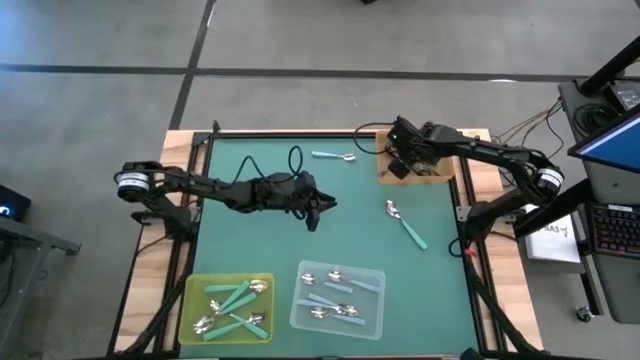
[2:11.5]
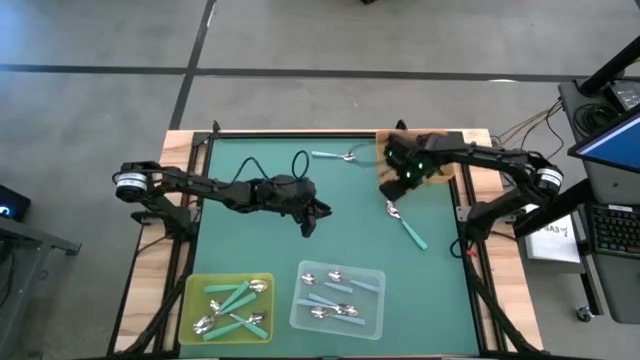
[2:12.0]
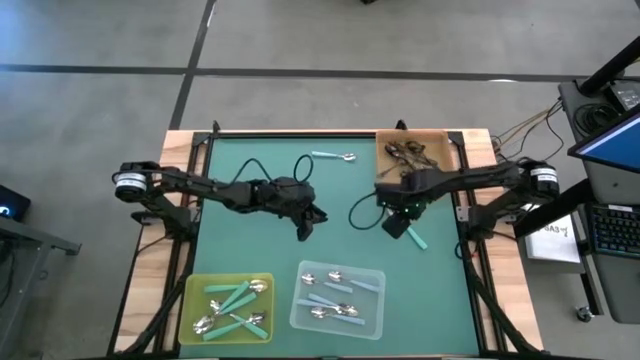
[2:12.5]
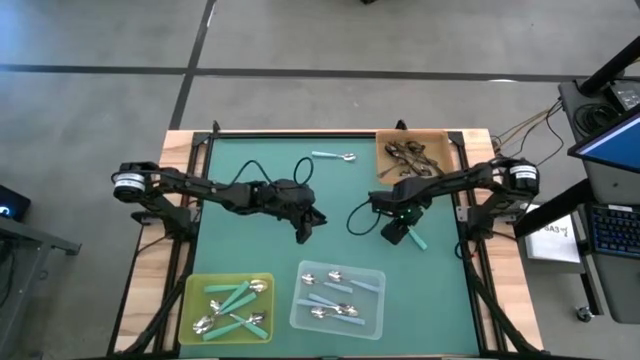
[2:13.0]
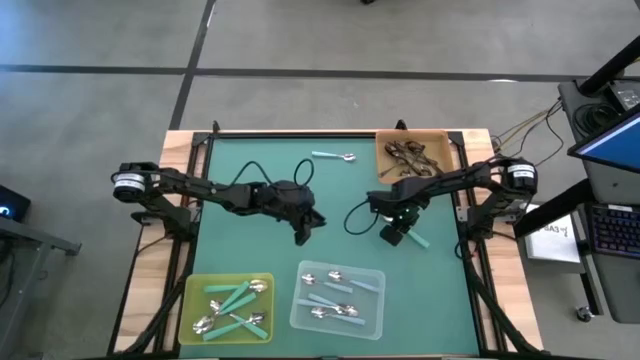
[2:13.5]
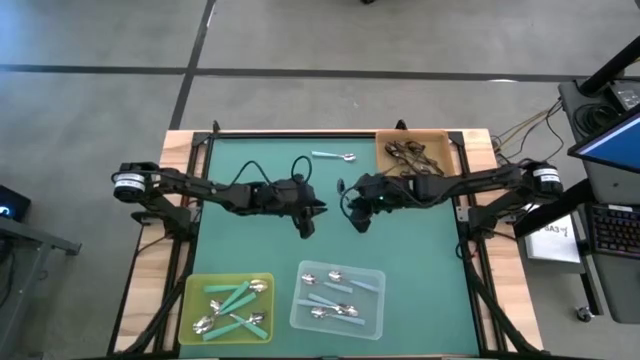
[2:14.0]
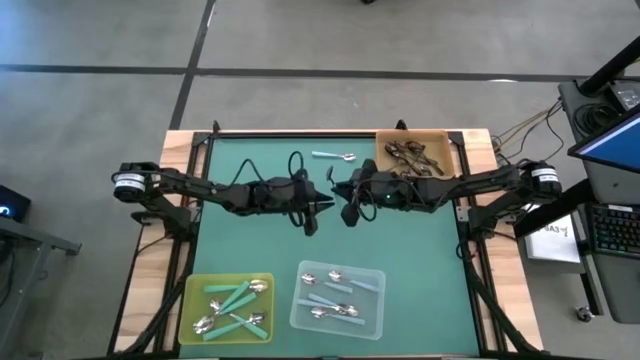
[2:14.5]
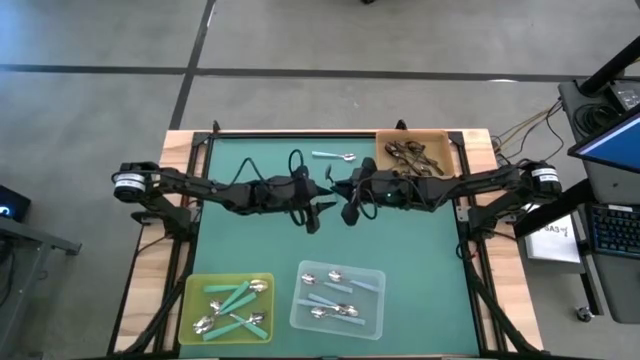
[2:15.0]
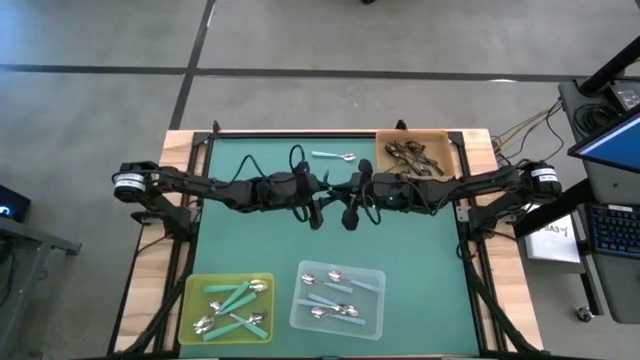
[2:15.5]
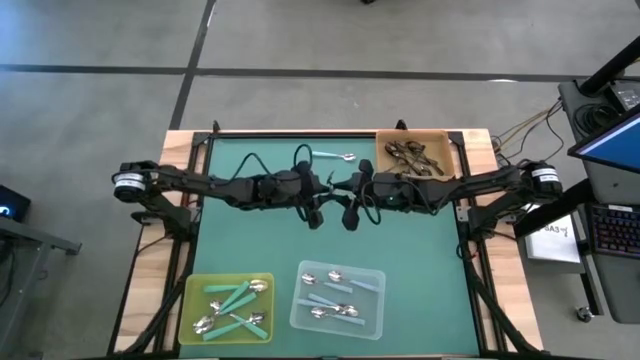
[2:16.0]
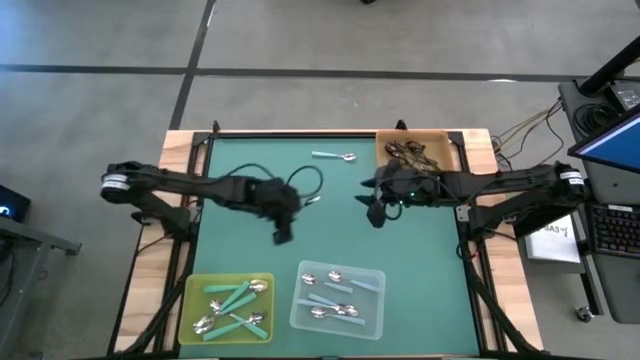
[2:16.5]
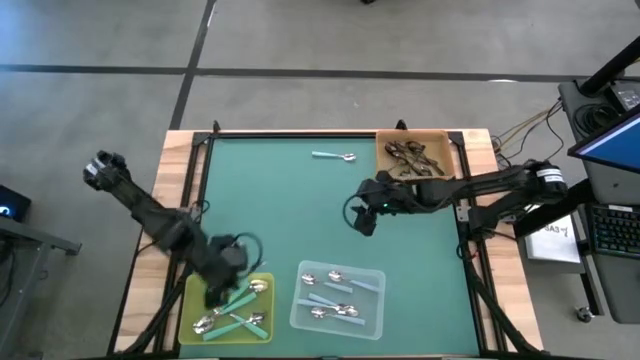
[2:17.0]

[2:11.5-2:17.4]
Task: Sort silverware by color (type)
Put the green spoon into the yellow bin

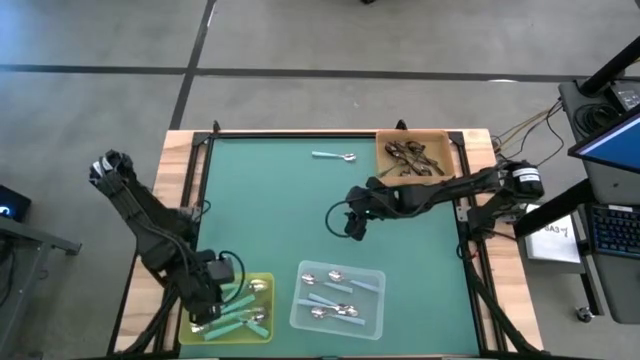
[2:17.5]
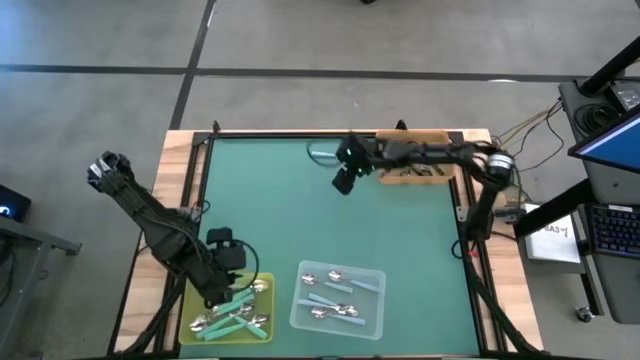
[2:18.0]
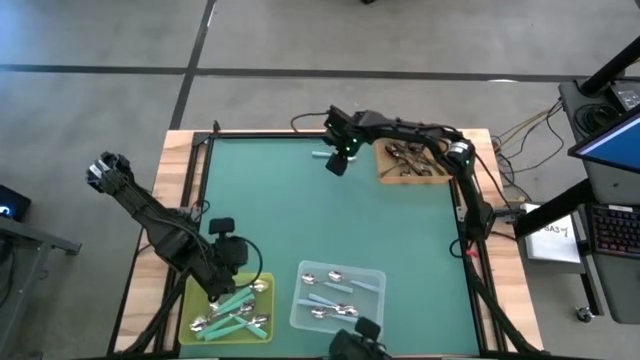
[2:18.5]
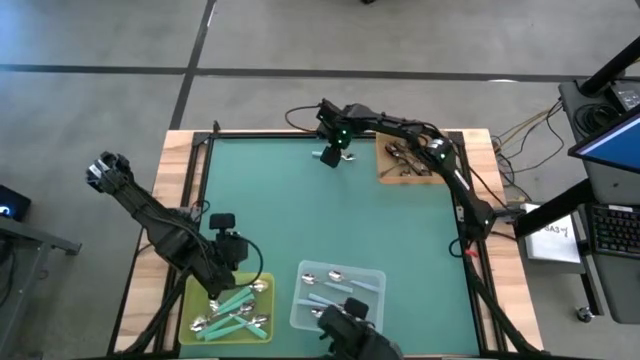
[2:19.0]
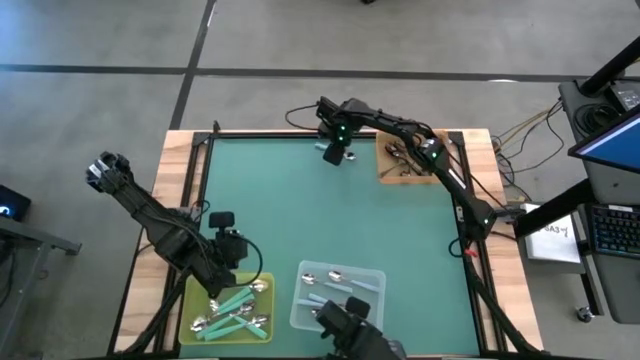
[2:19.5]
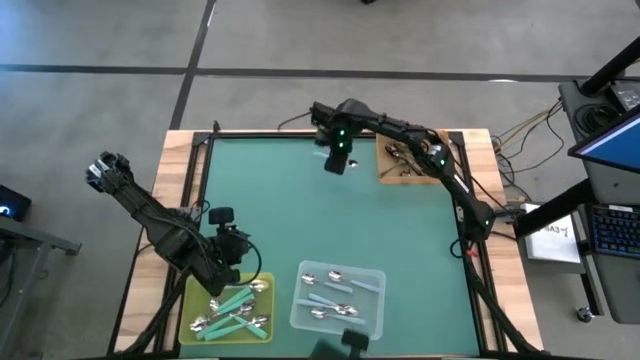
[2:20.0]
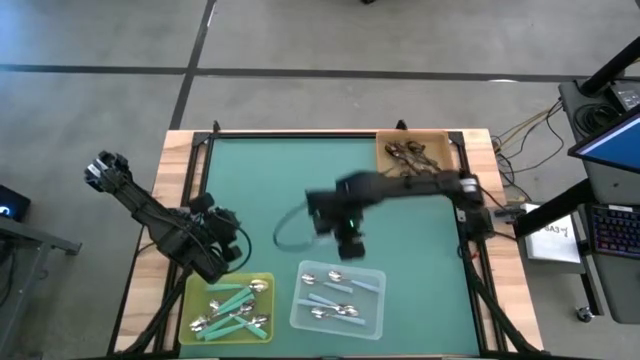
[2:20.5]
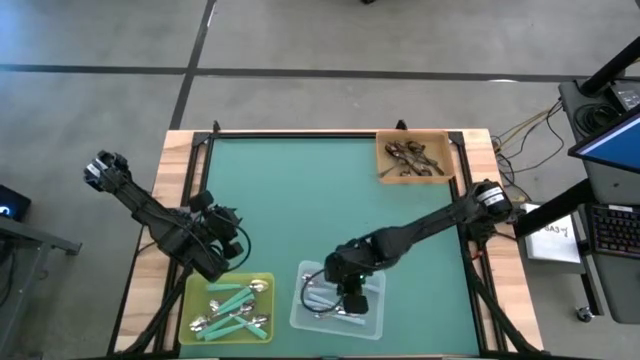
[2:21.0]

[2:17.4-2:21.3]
Put the blue spoon into the transparent bin

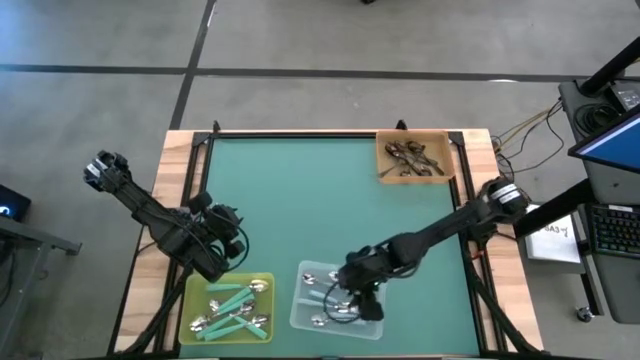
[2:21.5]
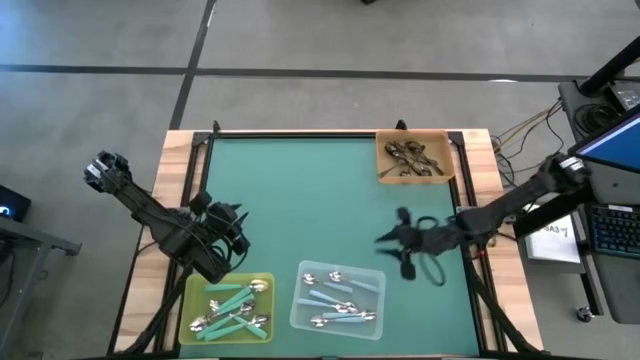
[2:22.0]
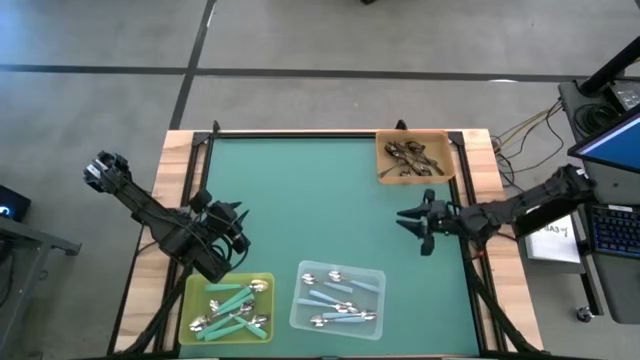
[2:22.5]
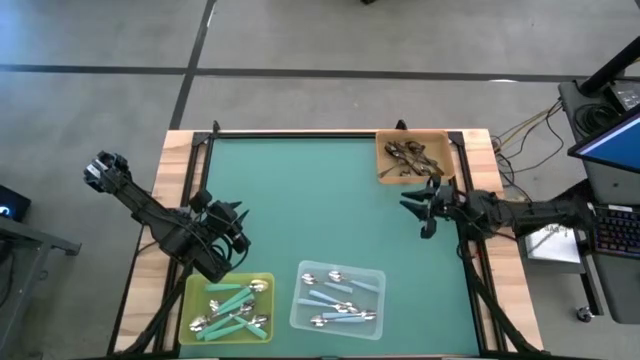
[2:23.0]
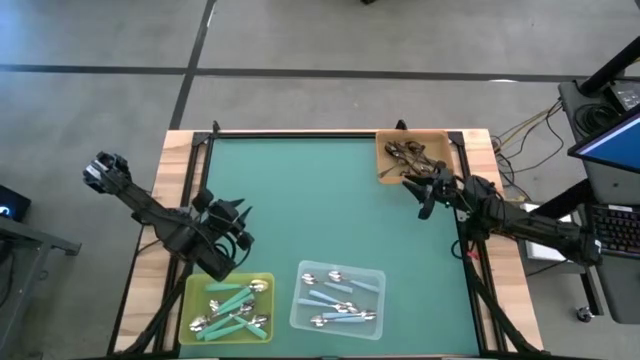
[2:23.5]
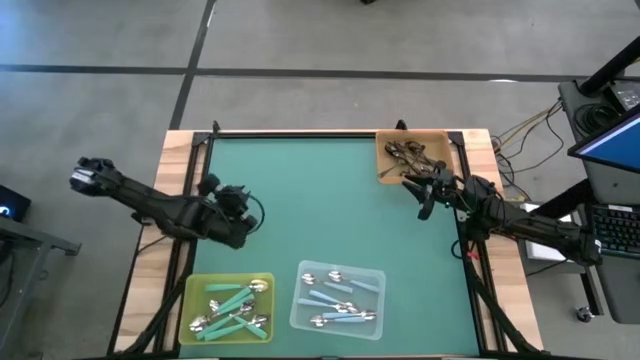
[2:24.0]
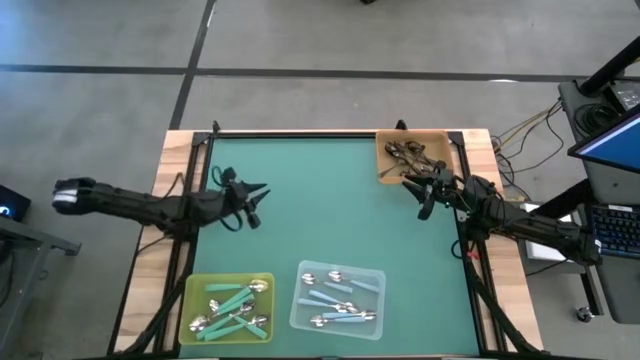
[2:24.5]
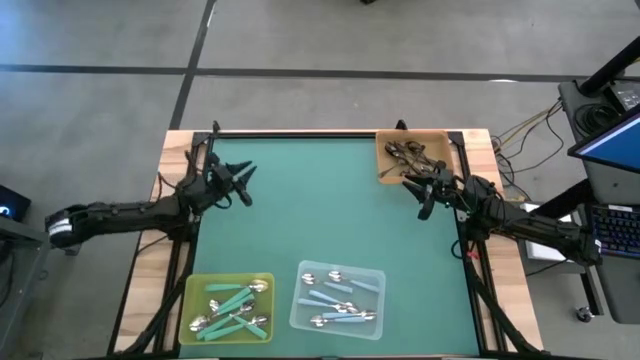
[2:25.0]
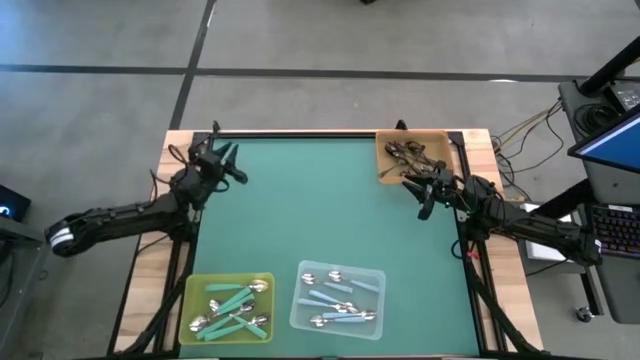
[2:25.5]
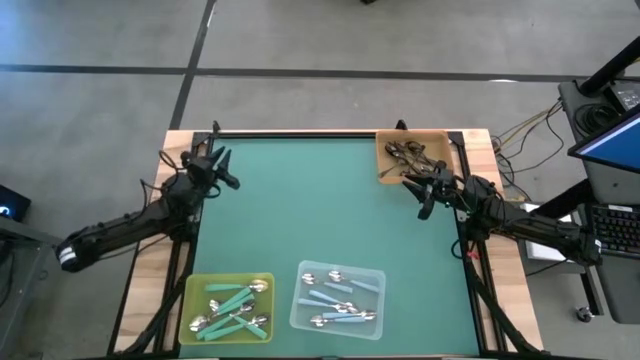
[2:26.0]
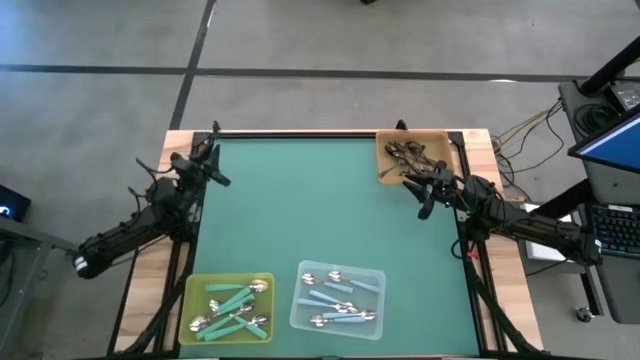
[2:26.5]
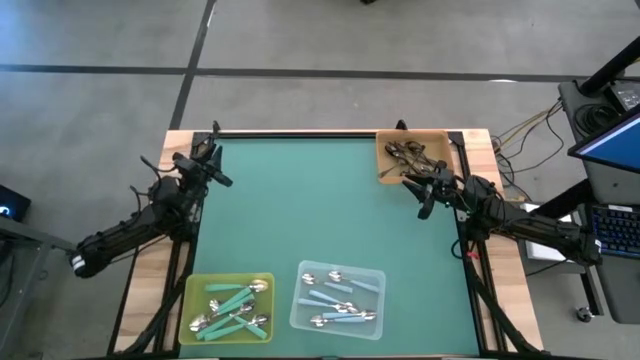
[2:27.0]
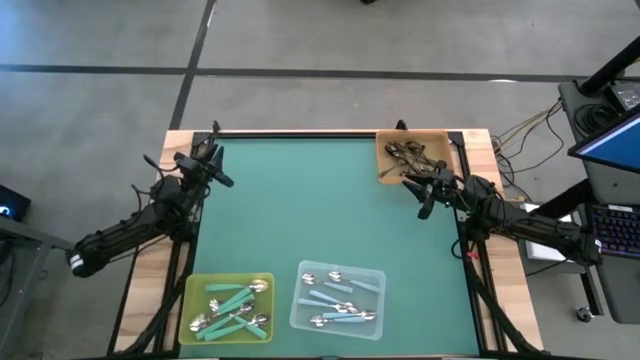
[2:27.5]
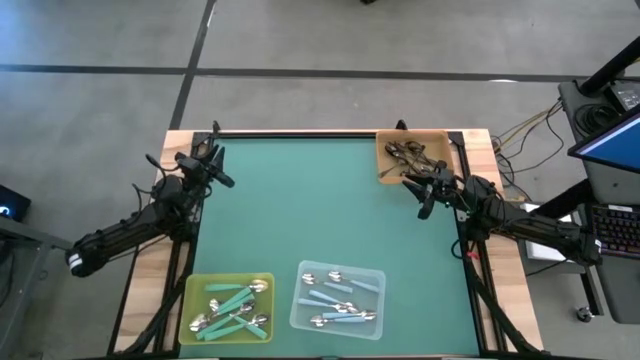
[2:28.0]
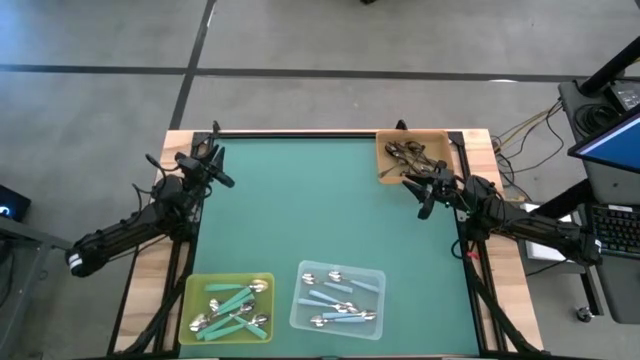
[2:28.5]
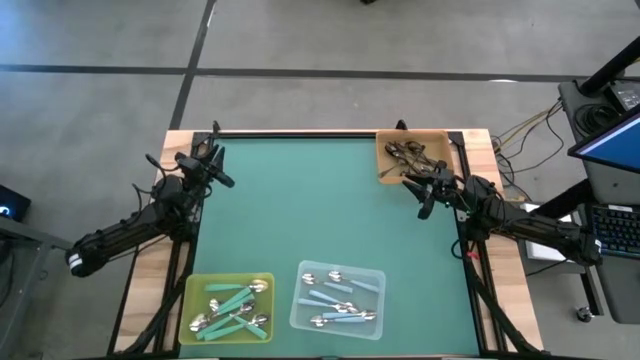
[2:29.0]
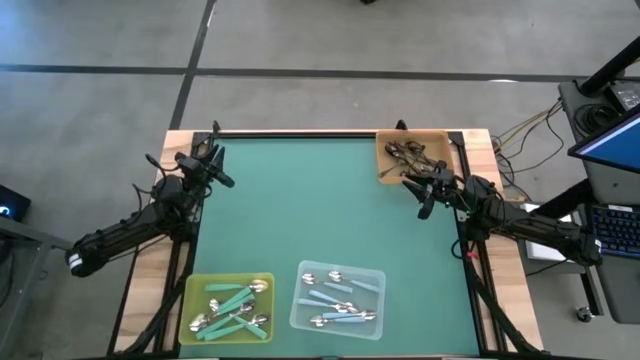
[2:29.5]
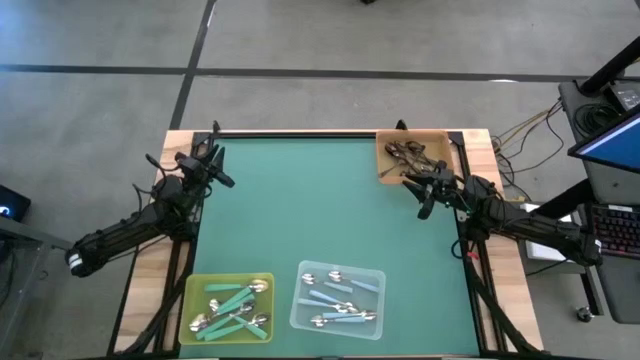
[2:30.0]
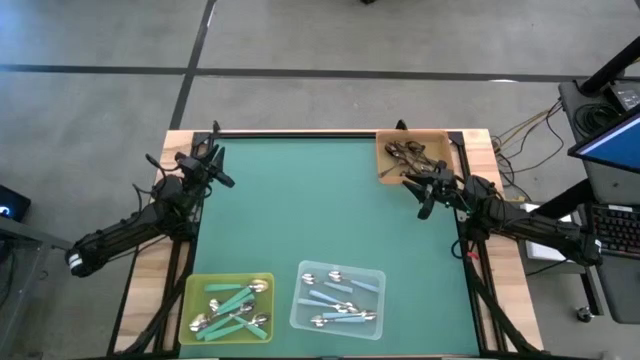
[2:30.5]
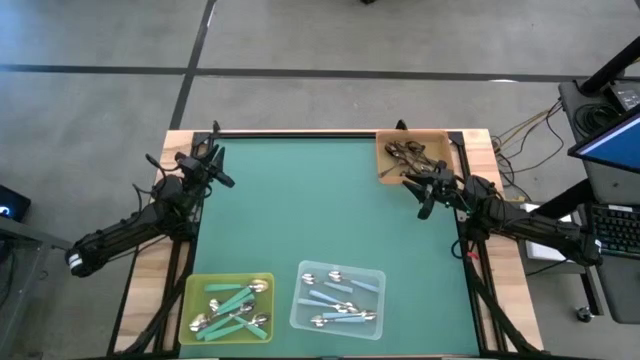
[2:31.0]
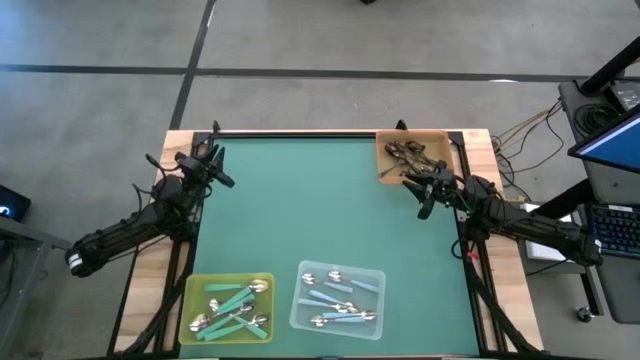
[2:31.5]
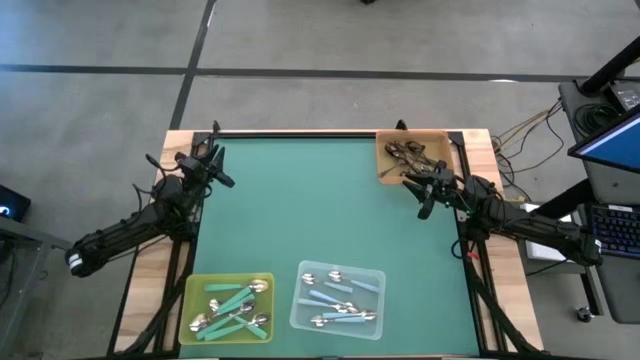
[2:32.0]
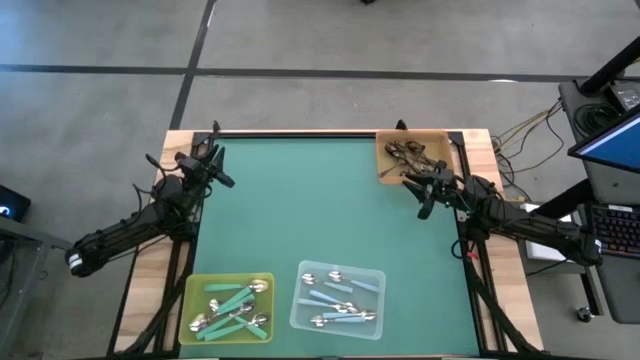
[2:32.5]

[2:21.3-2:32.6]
Return to Home Position
